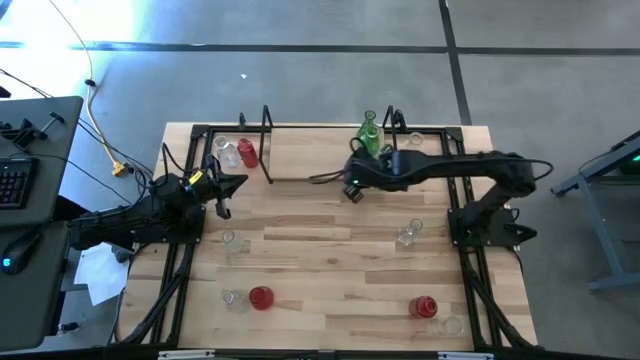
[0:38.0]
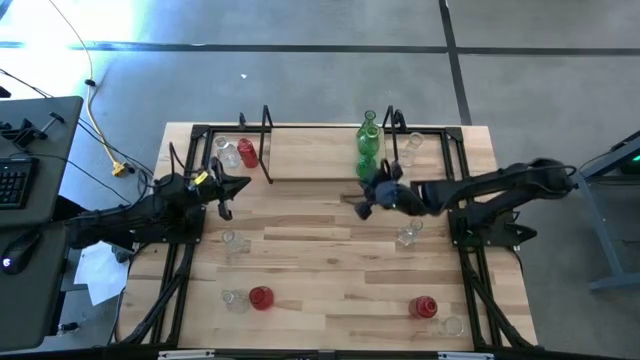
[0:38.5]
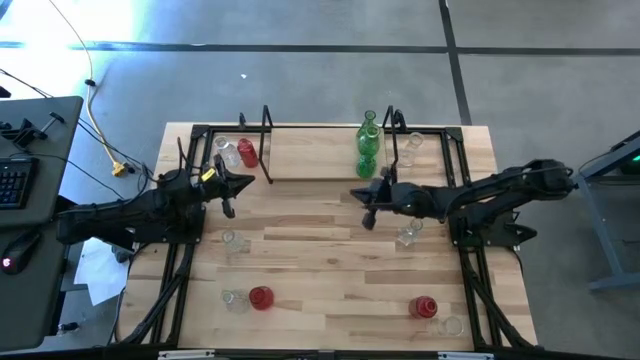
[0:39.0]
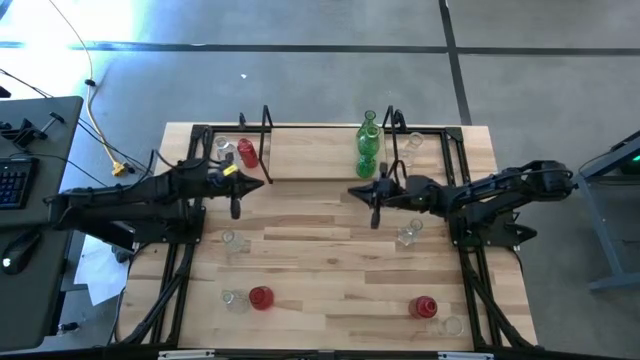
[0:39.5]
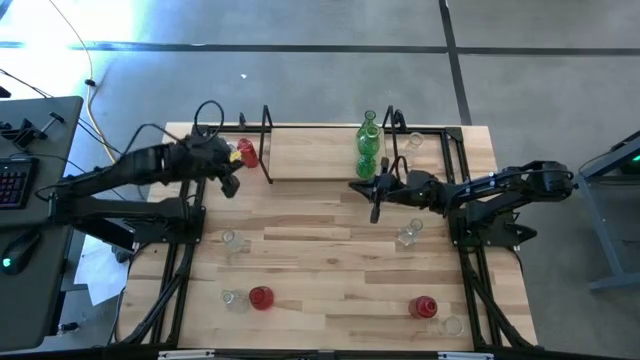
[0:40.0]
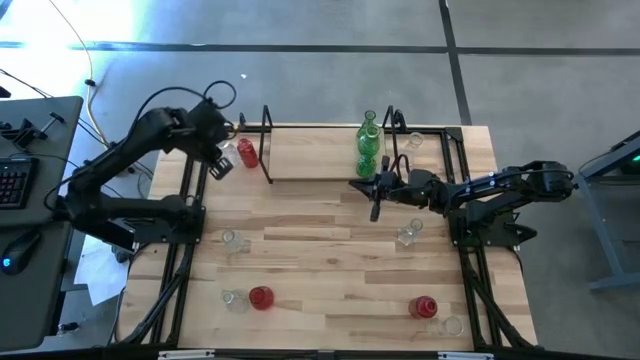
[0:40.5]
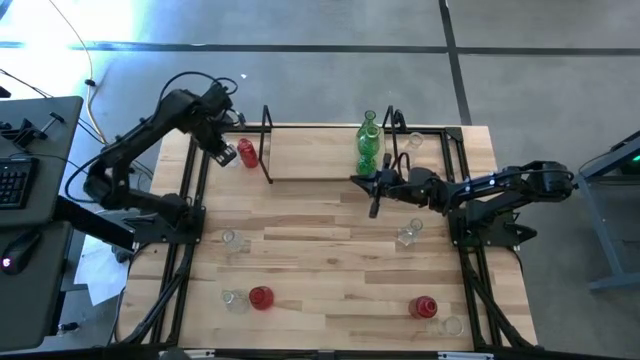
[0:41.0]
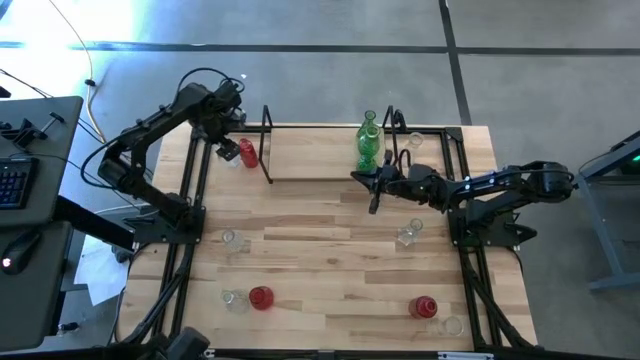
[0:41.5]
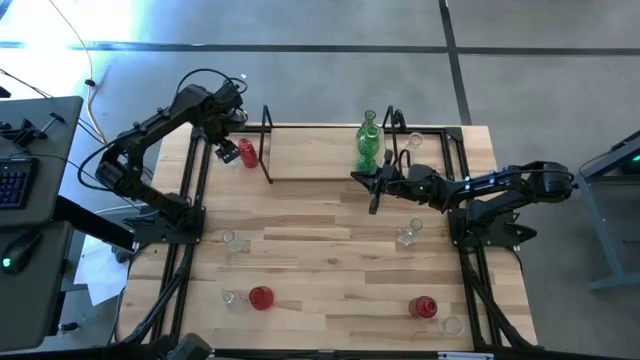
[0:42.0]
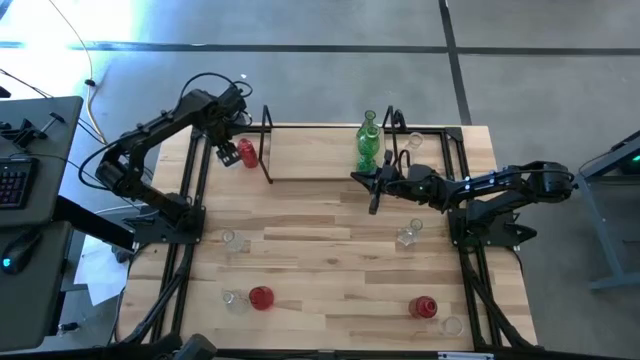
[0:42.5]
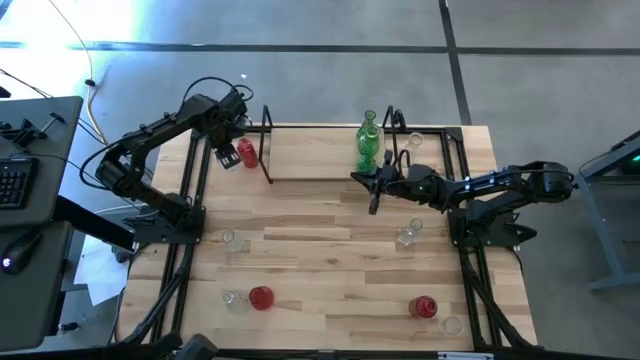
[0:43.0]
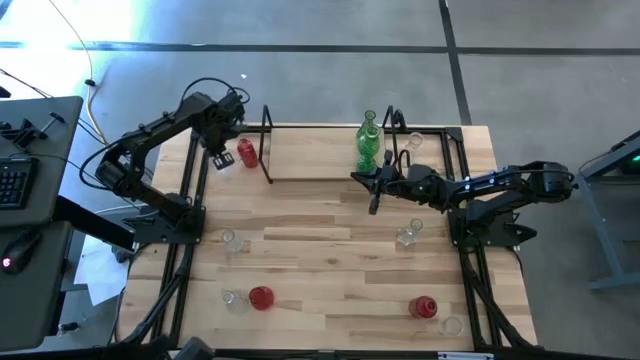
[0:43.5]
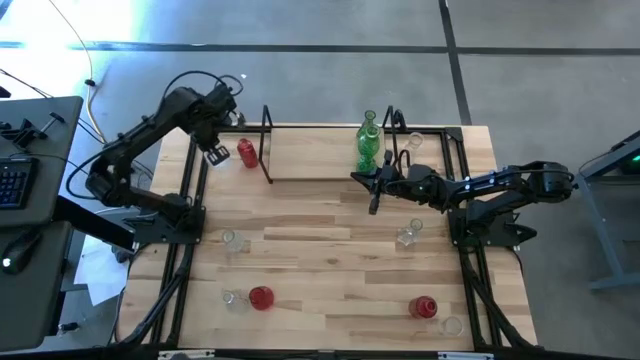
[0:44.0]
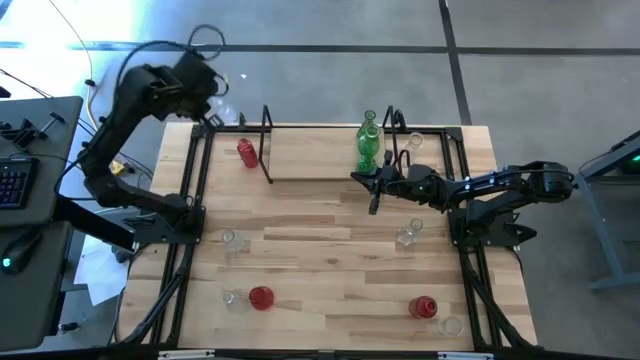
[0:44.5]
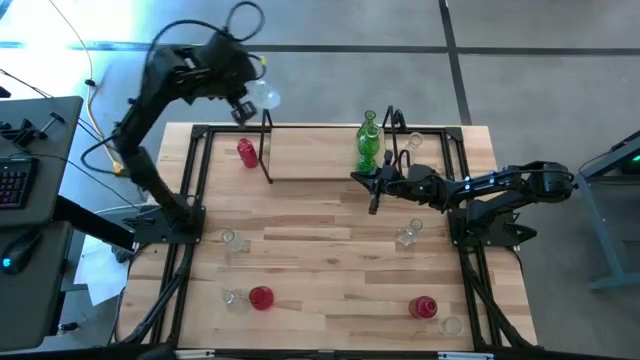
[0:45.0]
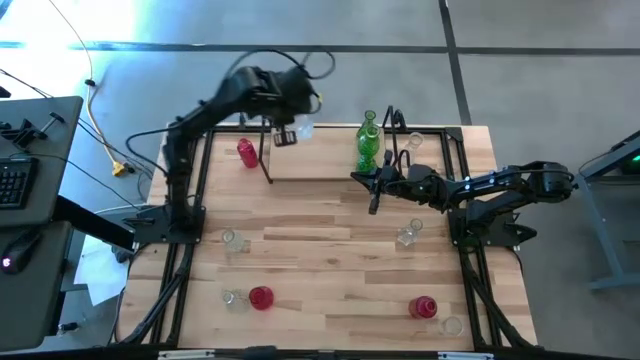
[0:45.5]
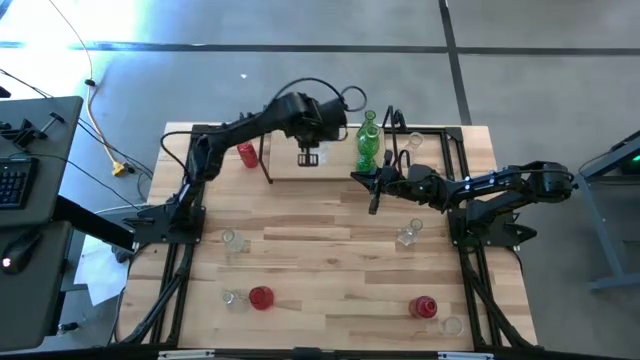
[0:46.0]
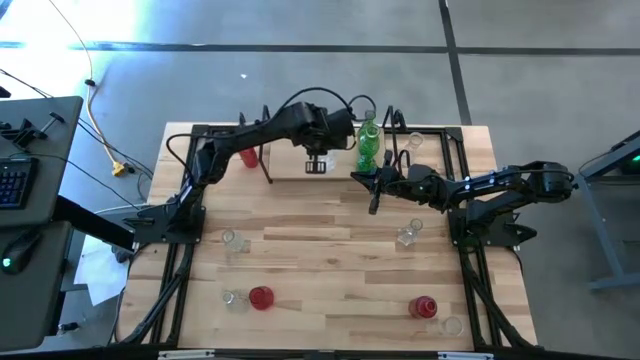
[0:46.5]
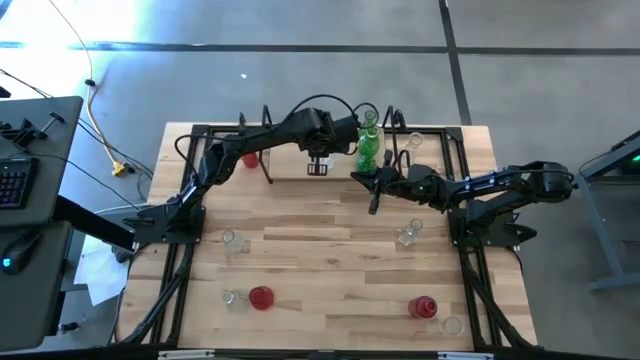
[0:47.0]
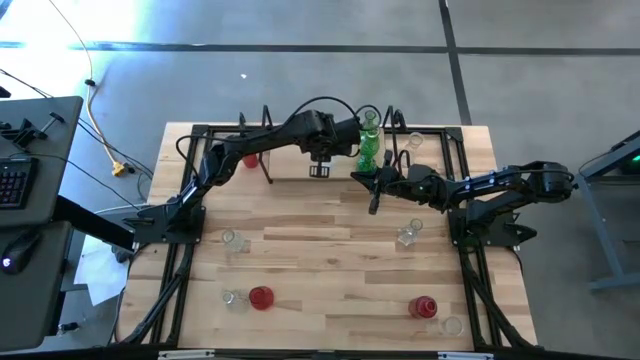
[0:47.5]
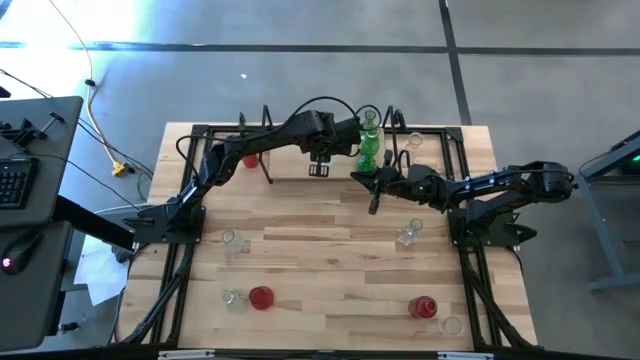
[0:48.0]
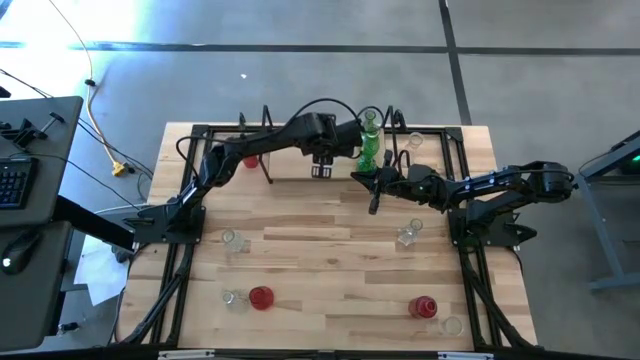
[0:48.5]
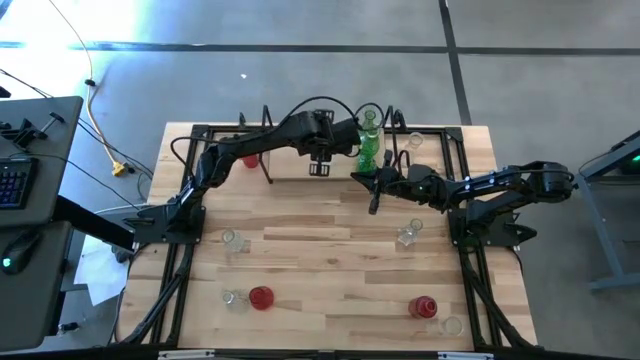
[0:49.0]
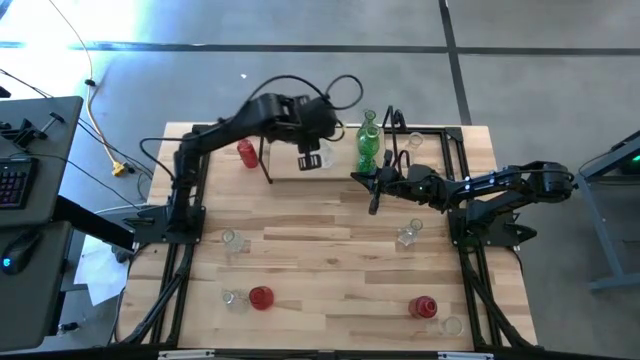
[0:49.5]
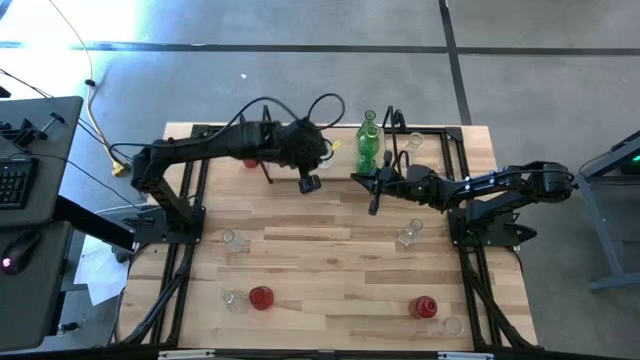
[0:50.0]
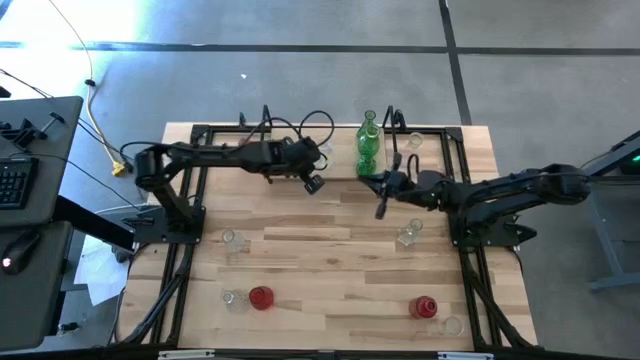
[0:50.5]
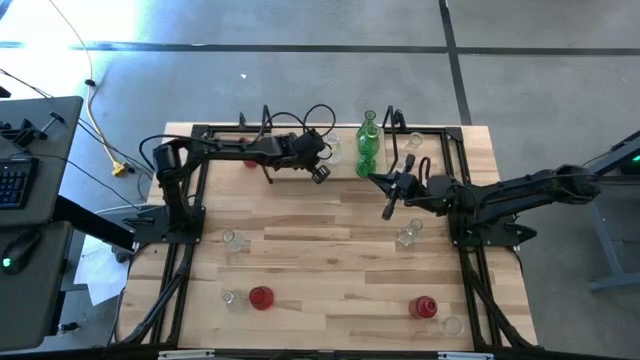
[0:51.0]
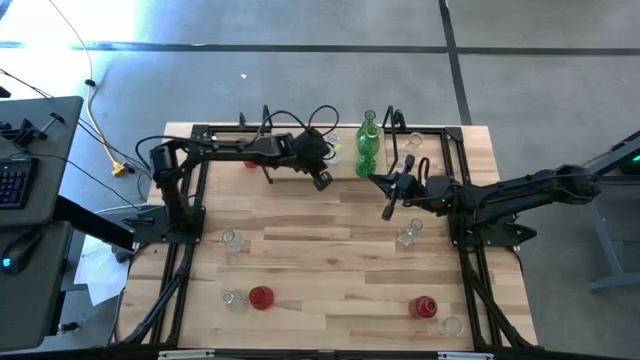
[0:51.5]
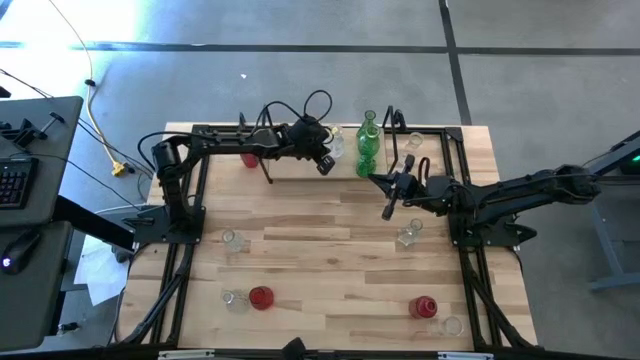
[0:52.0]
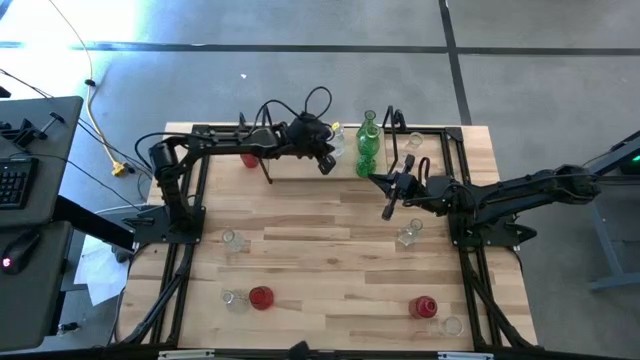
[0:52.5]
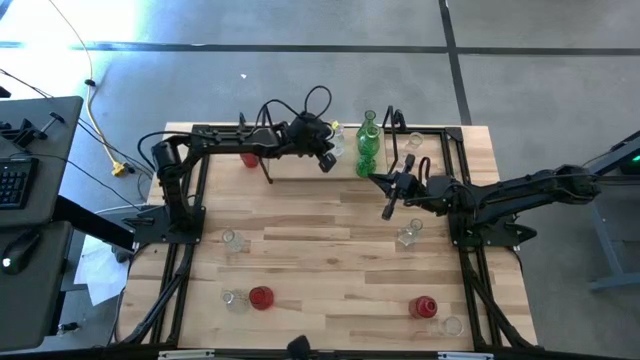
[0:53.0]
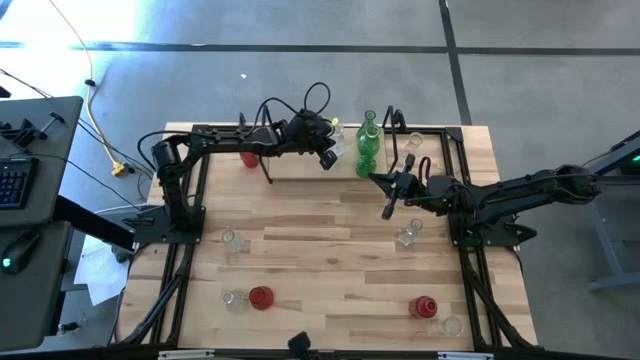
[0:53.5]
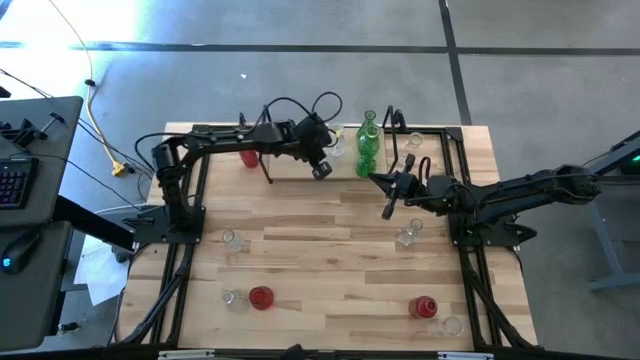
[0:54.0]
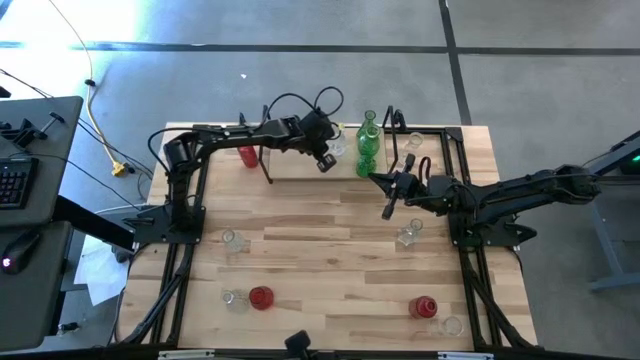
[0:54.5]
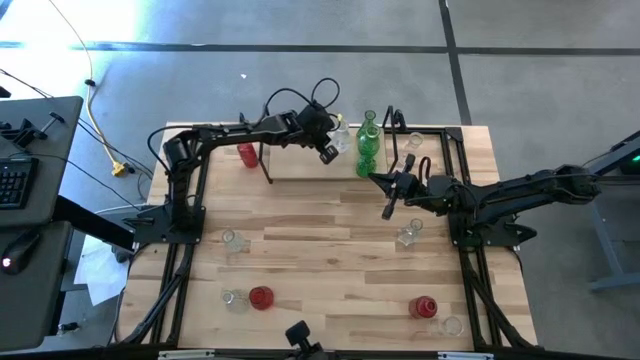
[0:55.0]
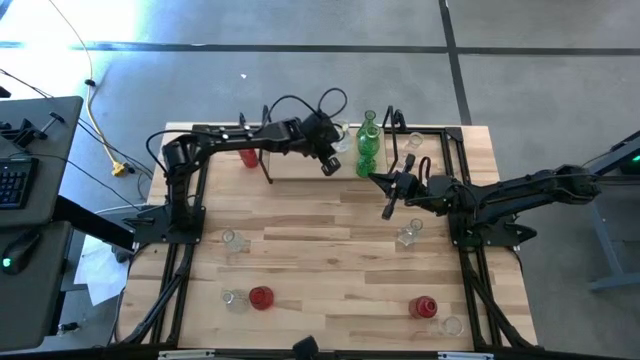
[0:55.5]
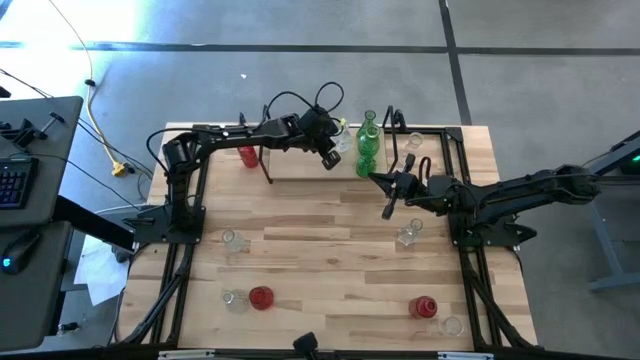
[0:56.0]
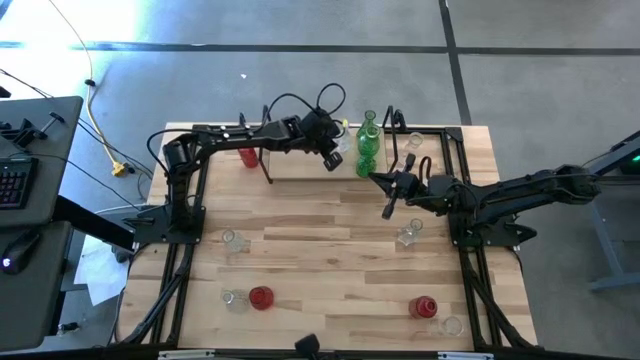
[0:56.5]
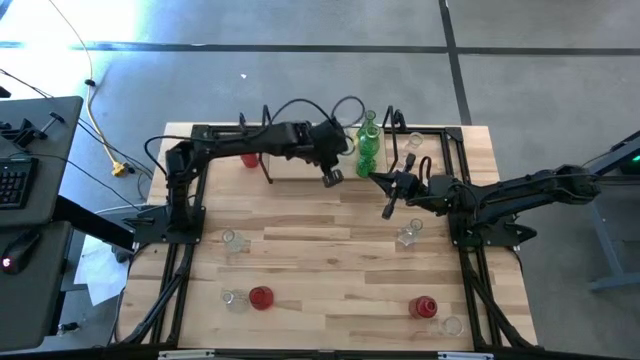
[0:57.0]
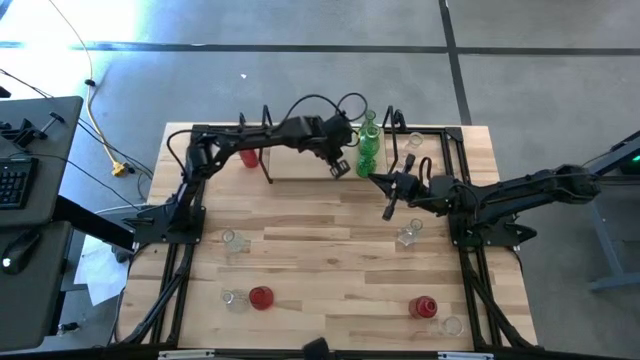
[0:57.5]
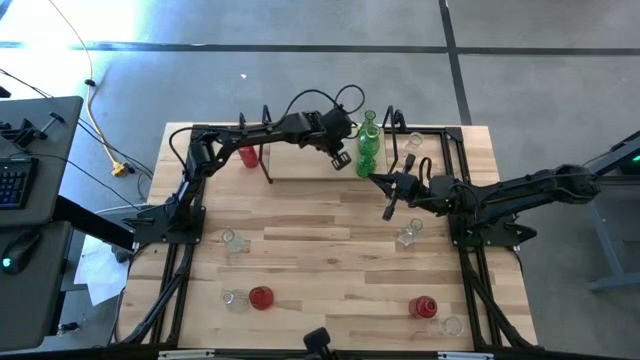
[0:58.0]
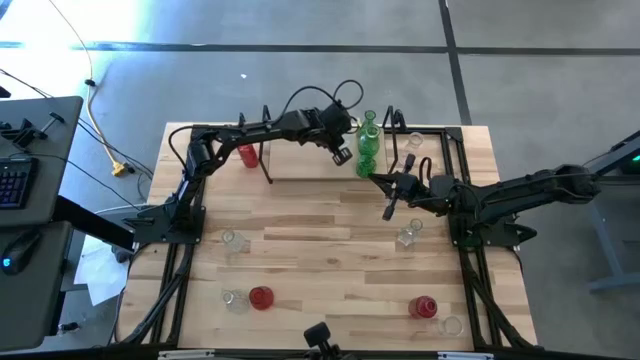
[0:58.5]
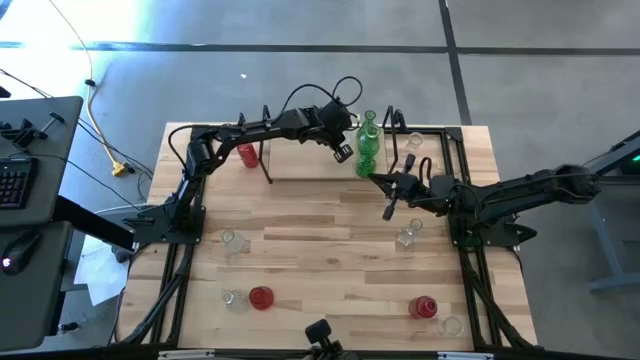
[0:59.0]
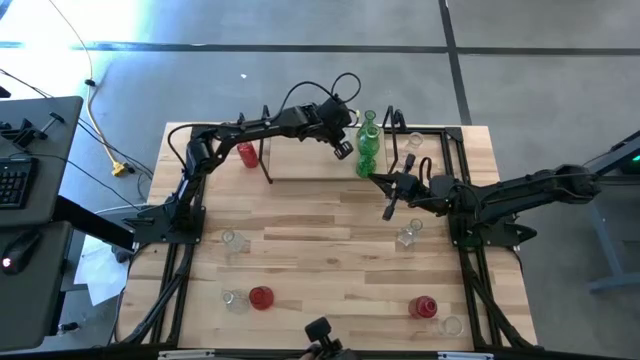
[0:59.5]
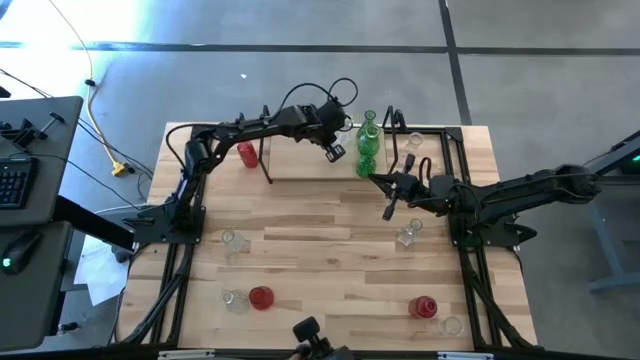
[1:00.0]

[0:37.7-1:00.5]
Task: sort vases onto shelf
Put the top left transparent vase on the shelf
